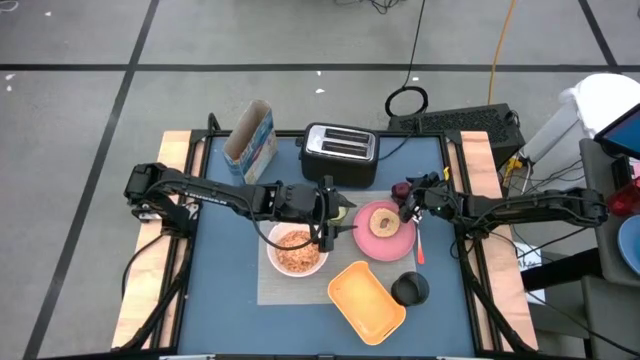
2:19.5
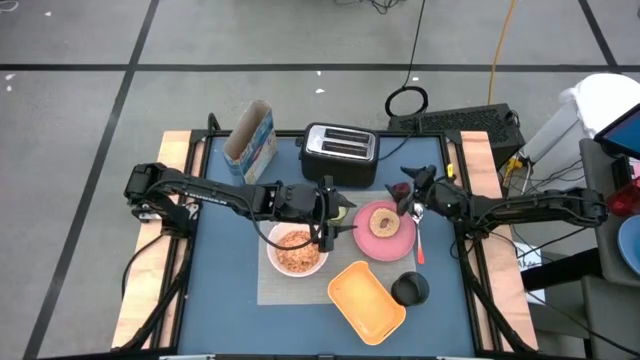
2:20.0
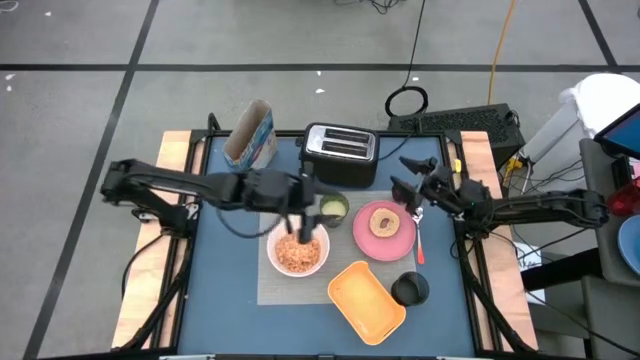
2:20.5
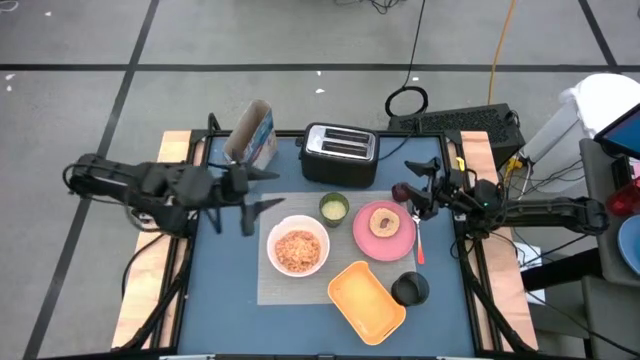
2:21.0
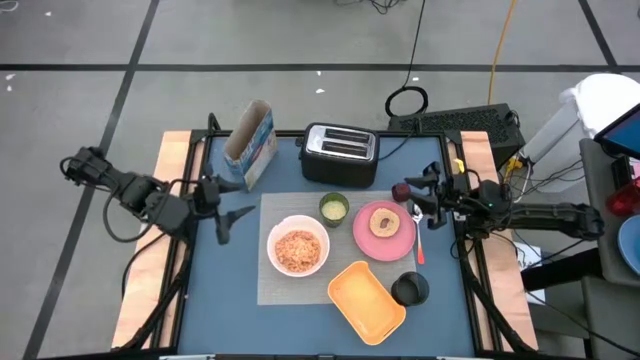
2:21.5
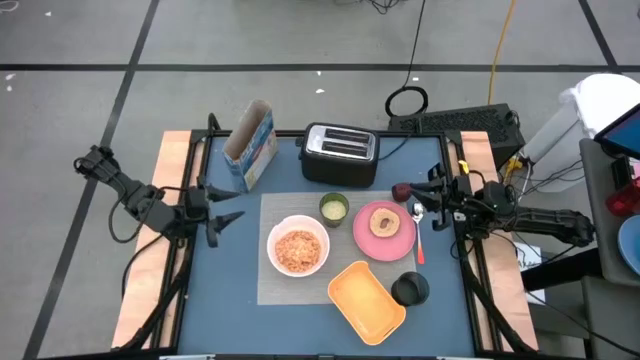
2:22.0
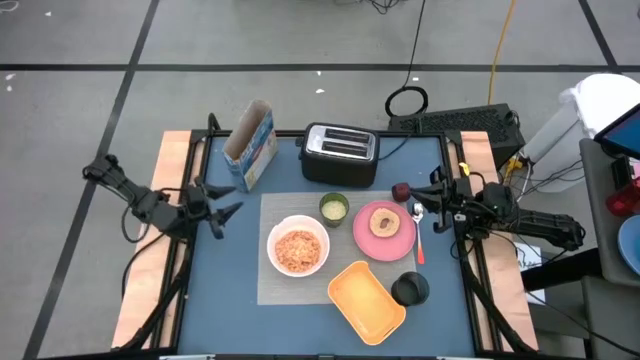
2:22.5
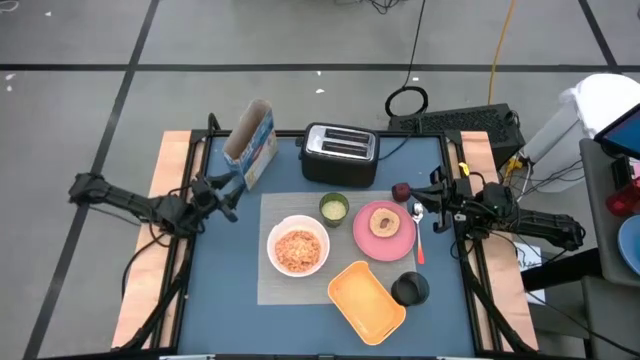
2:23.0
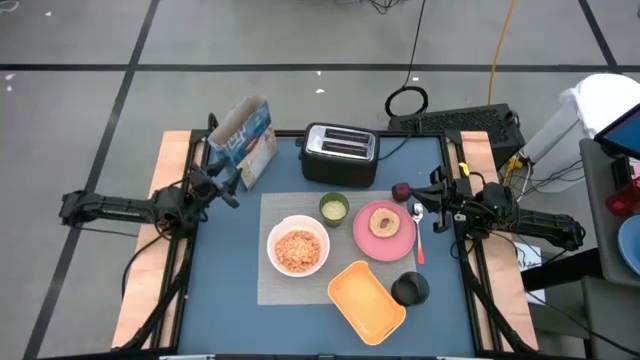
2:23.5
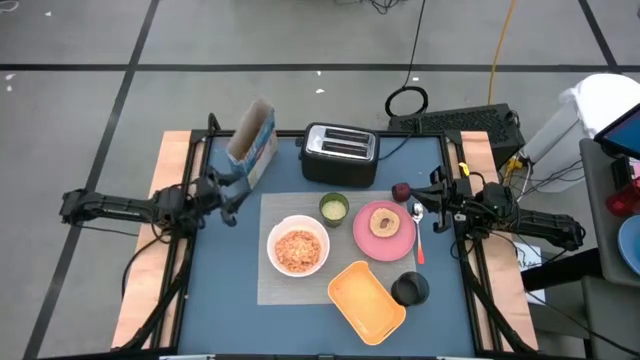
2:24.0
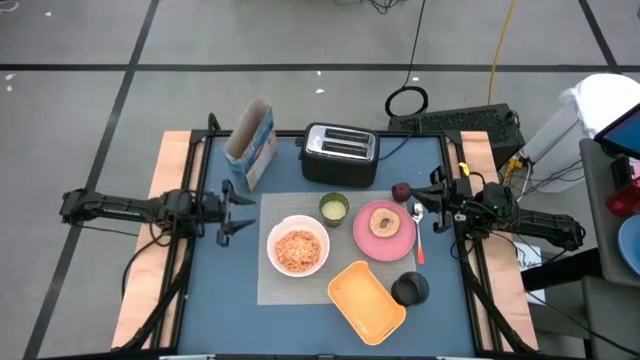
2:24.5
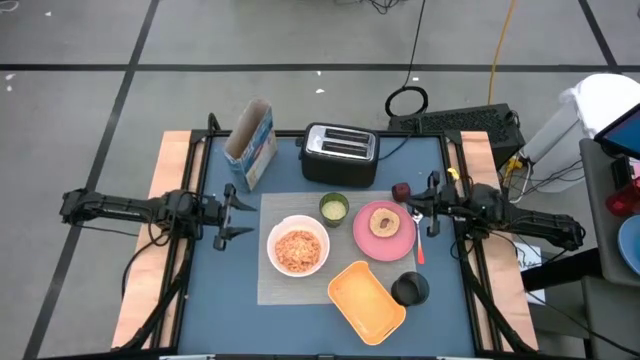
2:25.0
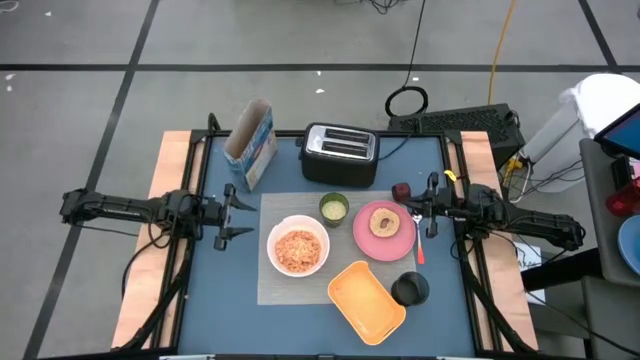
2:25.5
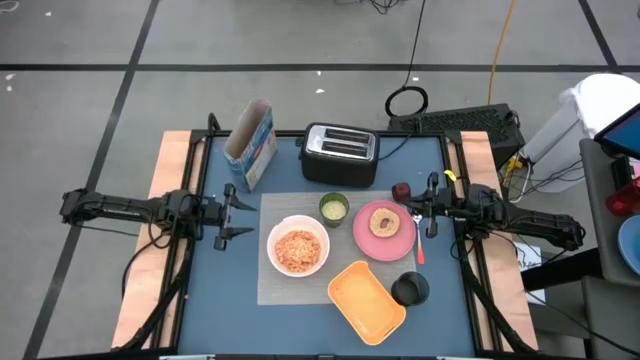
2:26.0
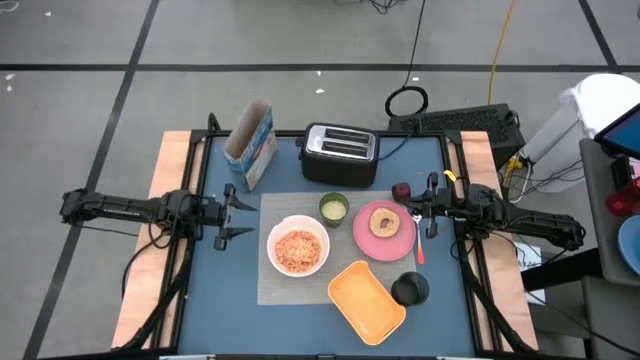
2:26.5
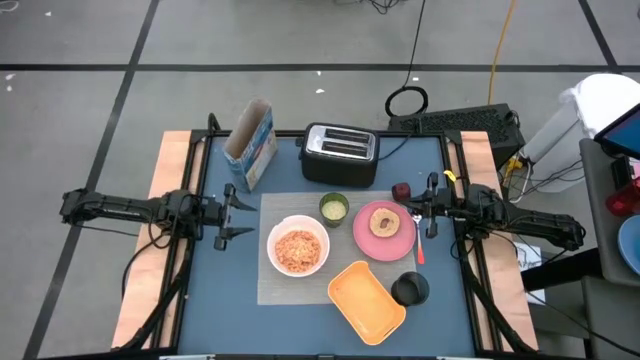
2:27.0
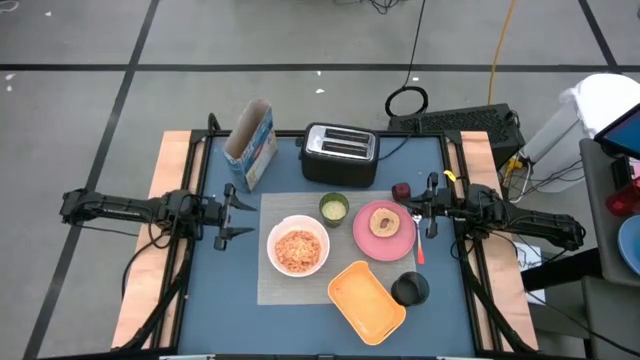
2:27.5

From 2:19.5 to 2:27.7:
Task: Arrange a breakfast setting
Return to Home Position

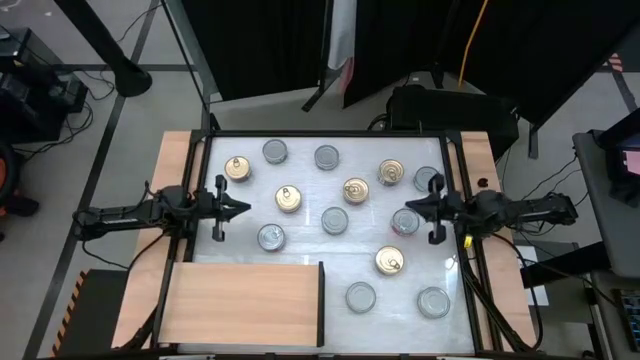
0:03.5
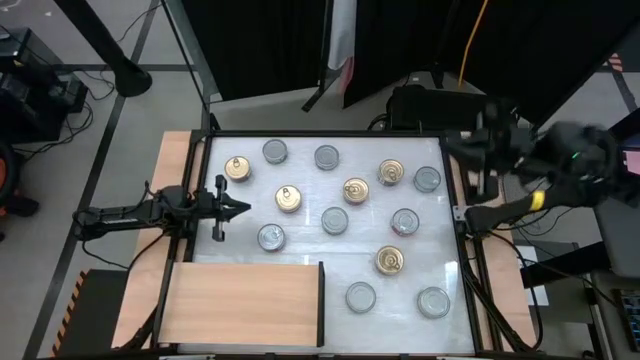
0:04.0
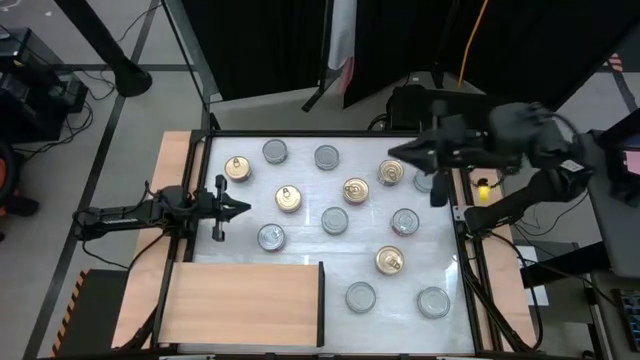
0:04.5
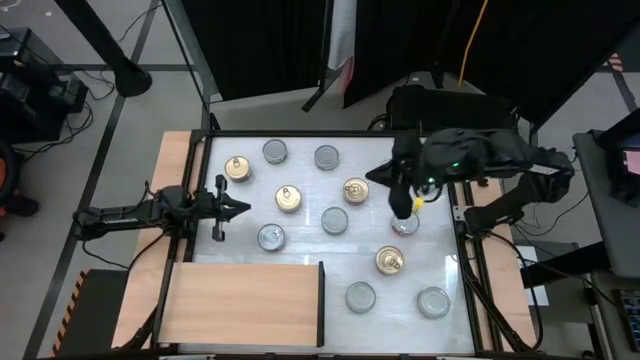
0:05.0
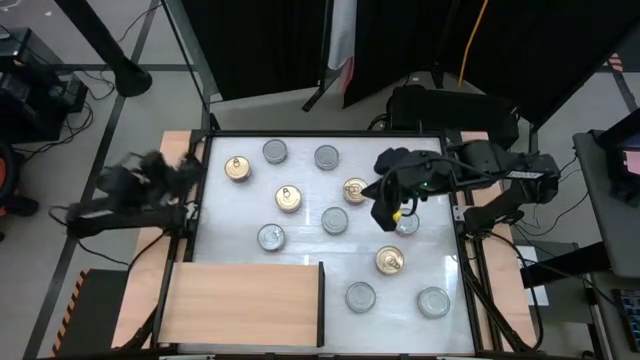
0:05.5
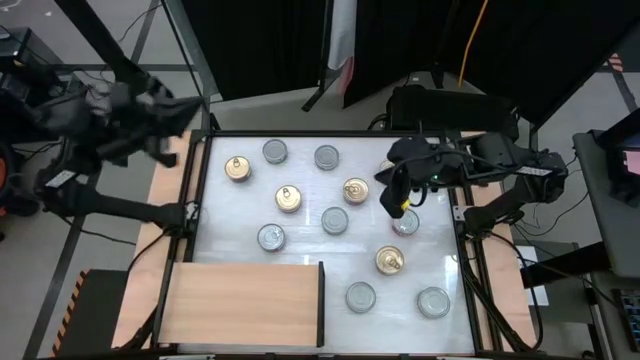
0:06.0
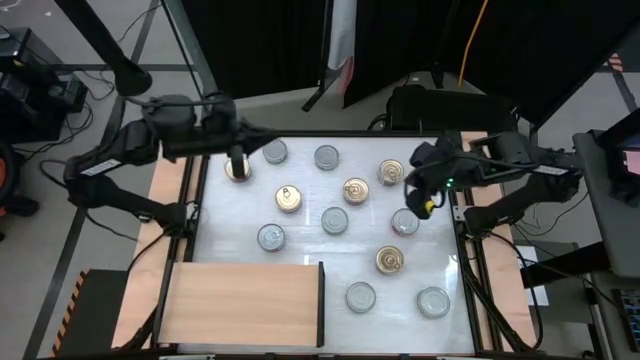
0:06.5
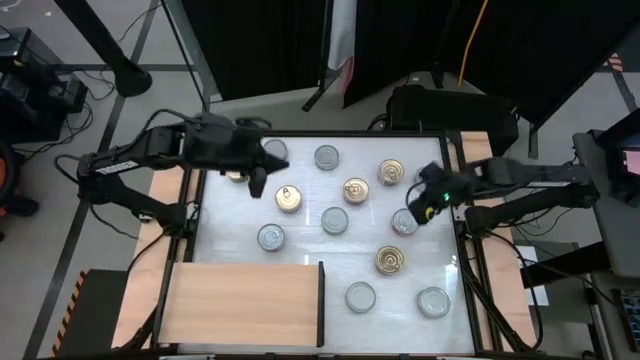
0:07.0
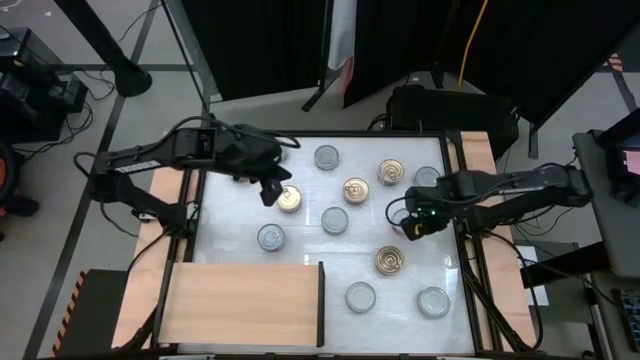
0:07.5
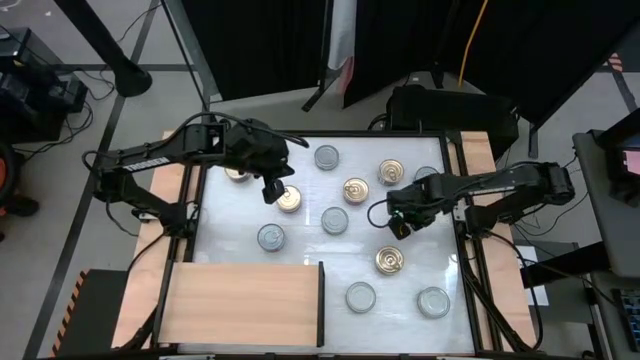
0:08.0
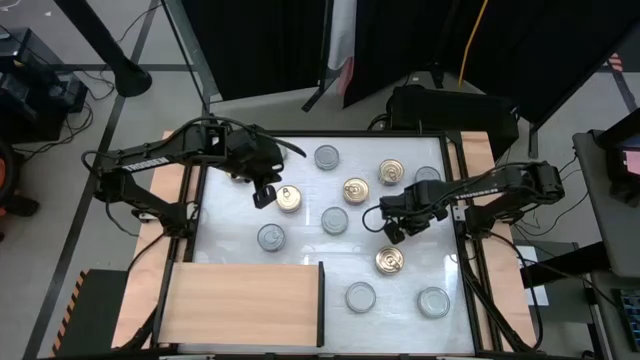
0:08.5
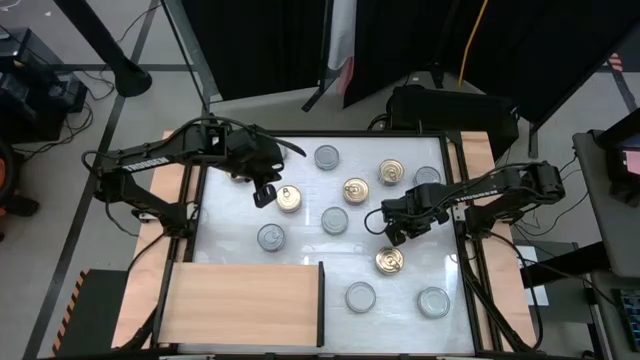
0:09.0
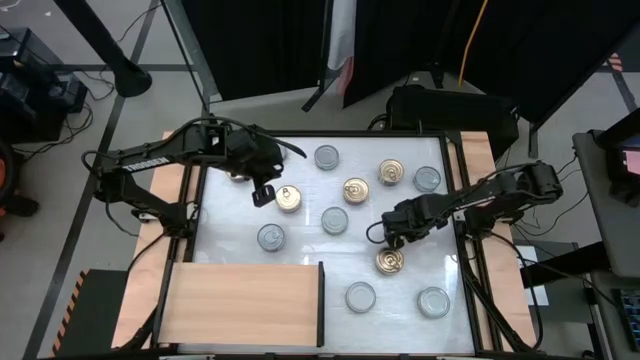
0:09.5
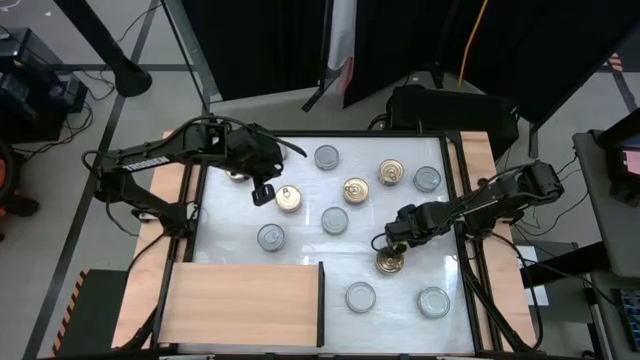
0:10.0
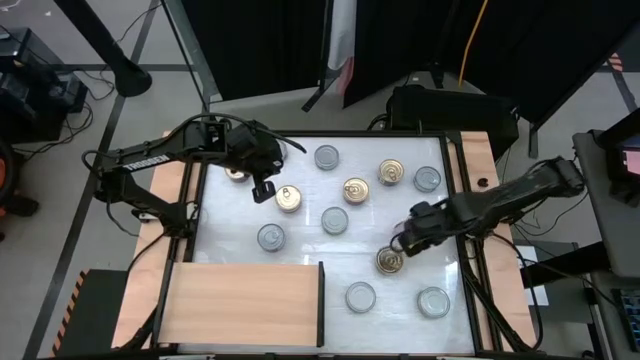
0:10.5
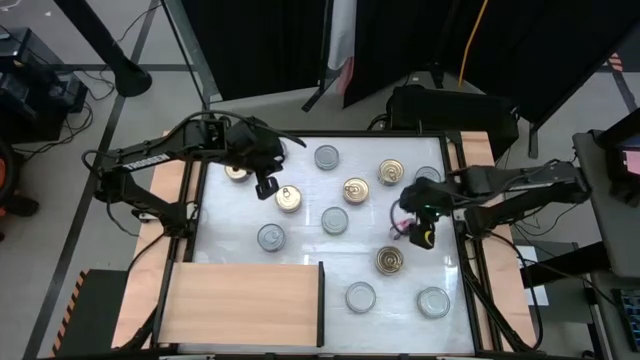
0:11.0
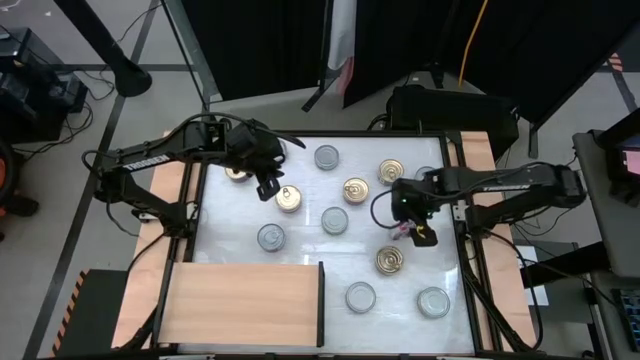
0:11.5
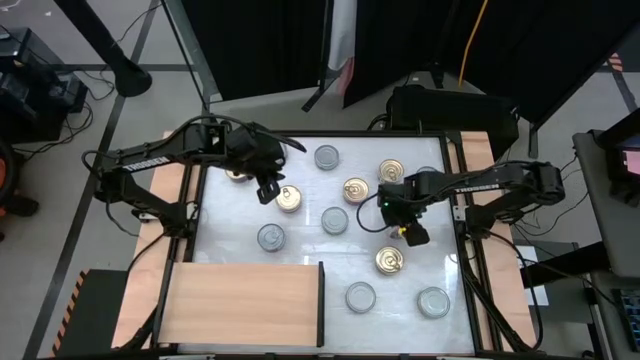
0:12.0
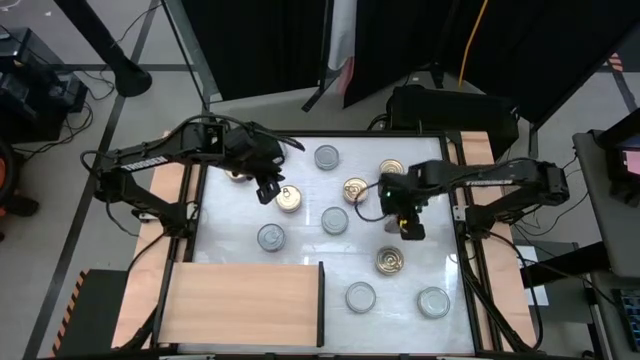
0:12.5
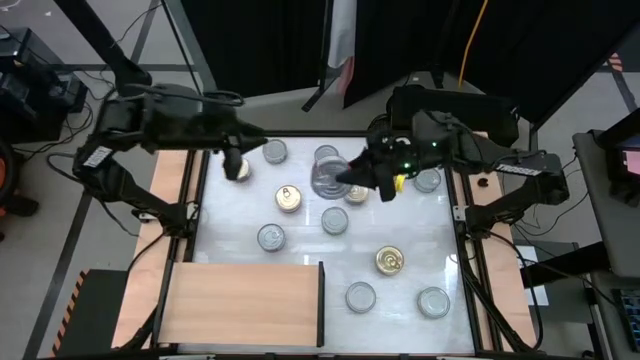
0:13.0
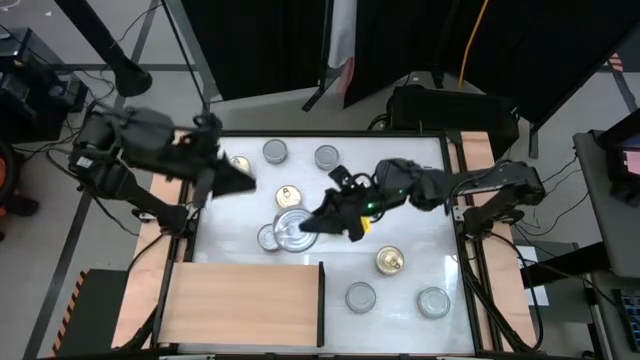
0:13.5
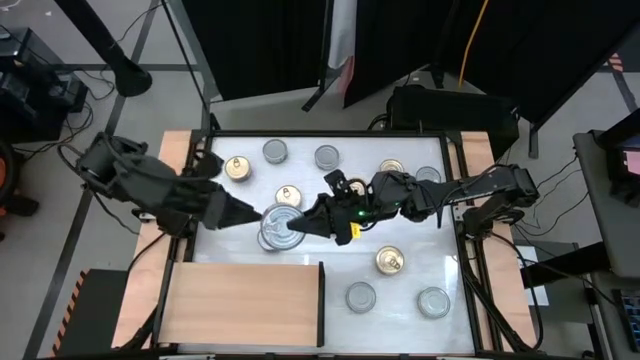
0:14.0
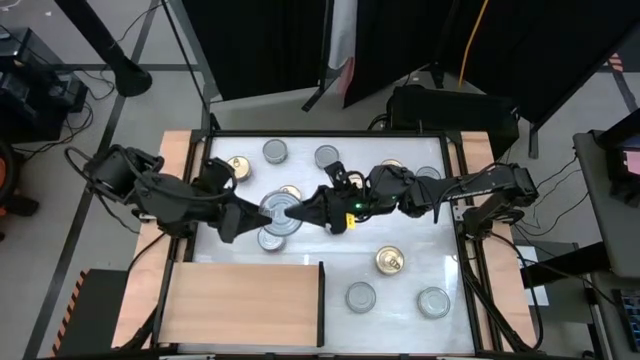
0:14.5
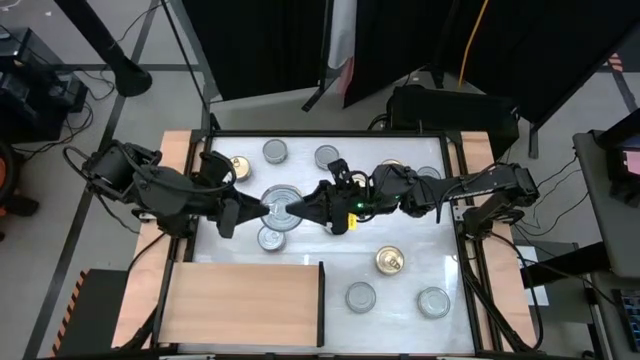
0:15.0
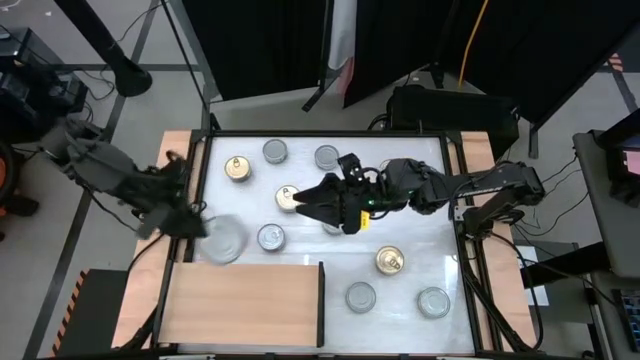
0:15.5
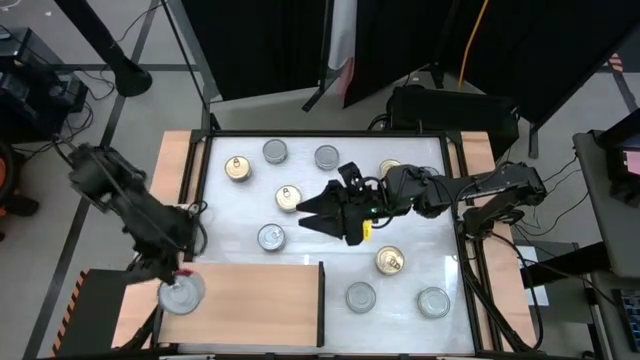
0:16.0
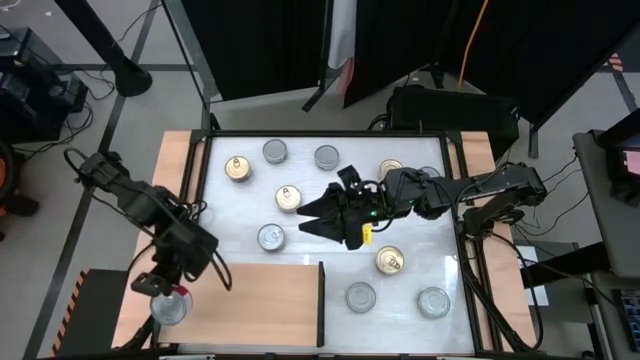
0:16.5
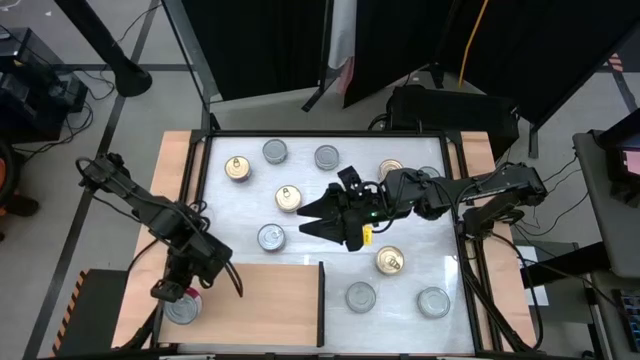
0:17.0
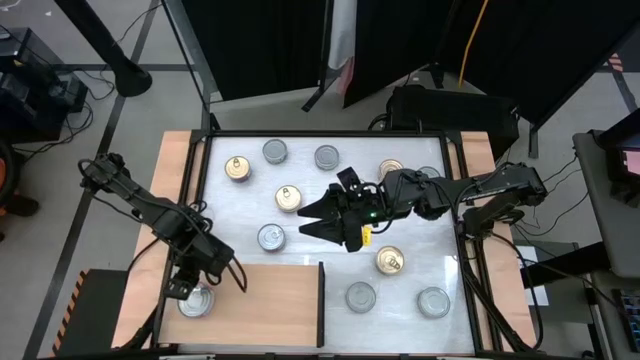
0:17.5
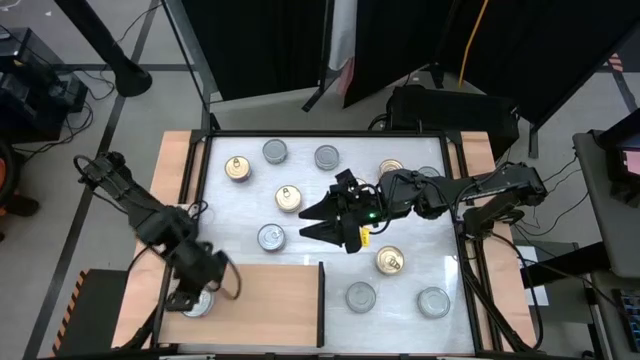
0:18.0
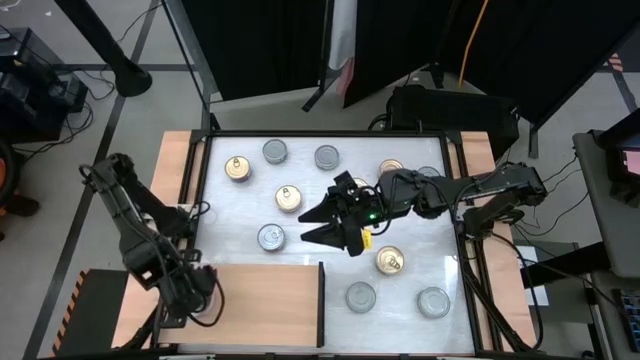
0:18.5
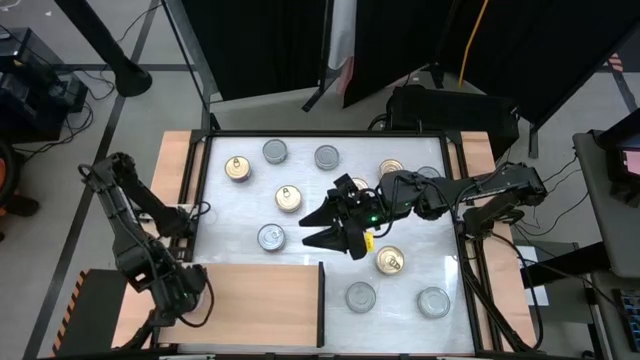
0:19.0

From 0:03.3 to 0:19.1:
Task: Stack canned seafood by type on shelf
Put the red tuna can on the shelf
